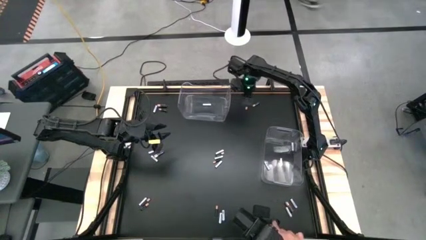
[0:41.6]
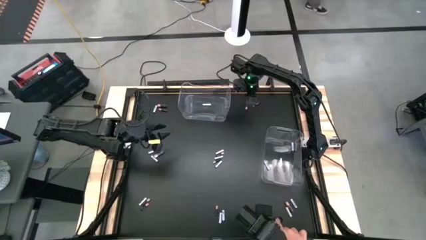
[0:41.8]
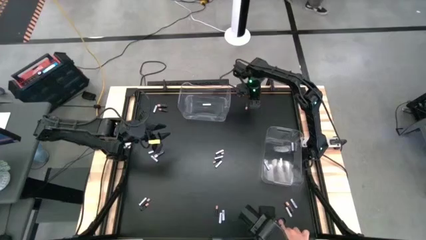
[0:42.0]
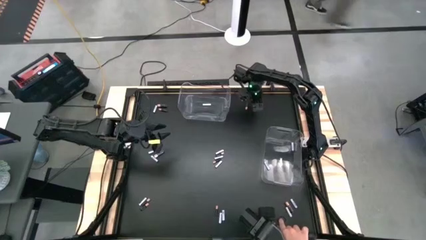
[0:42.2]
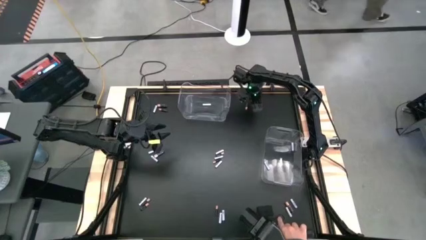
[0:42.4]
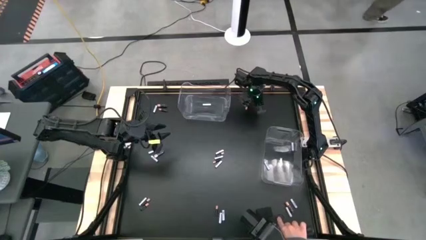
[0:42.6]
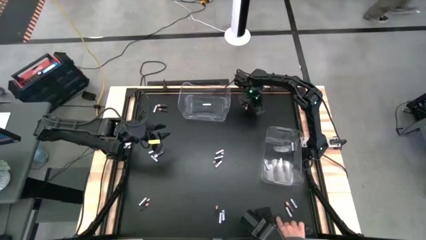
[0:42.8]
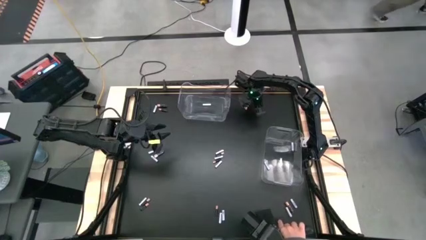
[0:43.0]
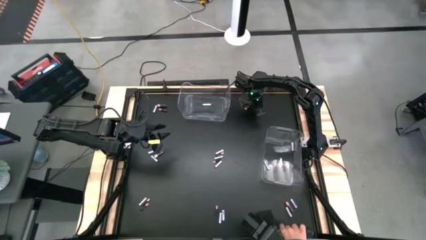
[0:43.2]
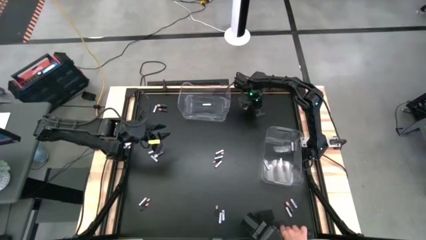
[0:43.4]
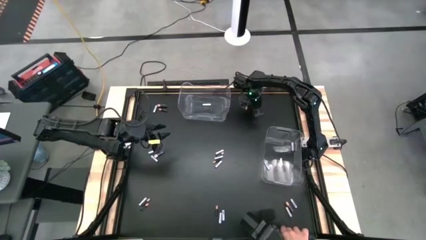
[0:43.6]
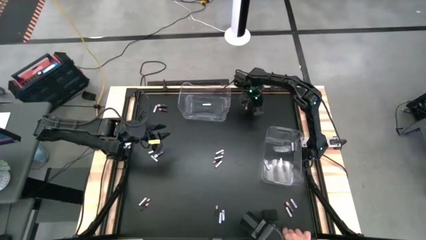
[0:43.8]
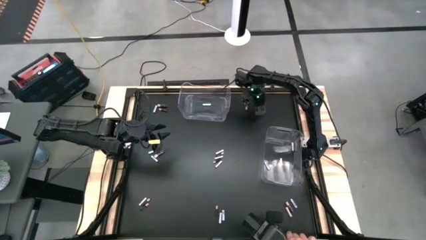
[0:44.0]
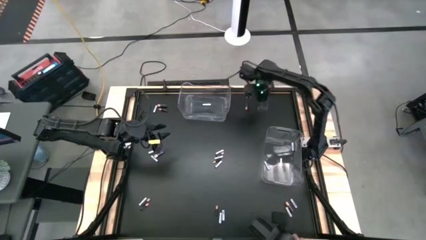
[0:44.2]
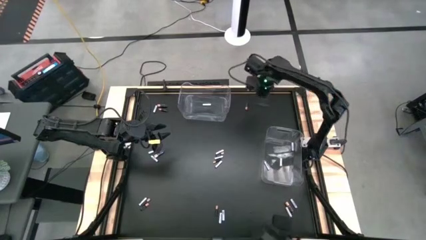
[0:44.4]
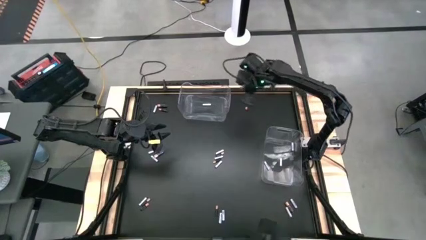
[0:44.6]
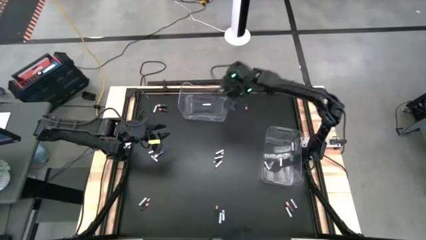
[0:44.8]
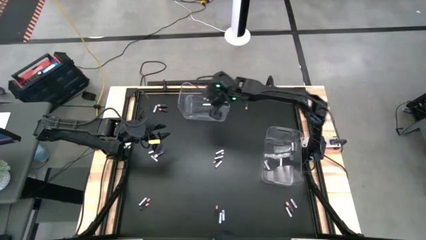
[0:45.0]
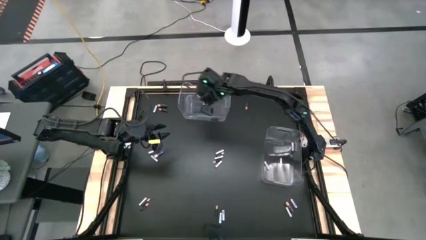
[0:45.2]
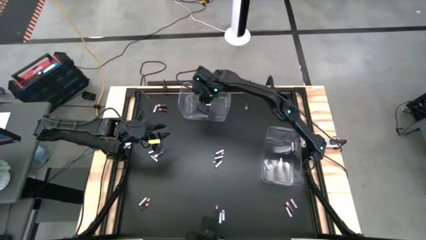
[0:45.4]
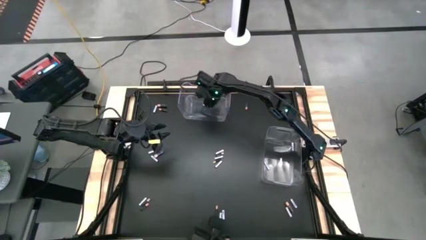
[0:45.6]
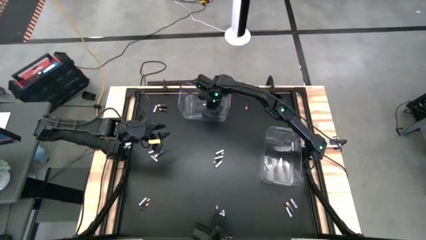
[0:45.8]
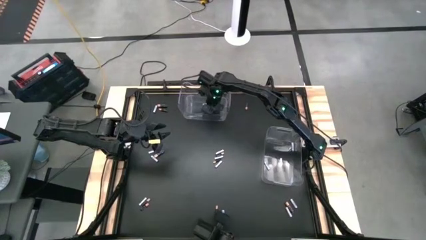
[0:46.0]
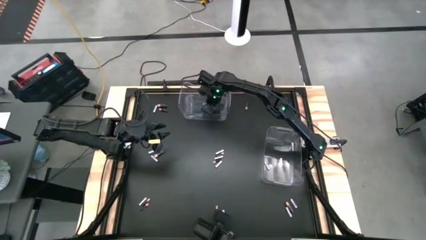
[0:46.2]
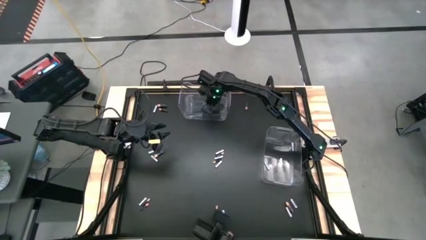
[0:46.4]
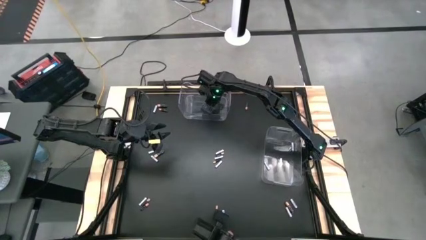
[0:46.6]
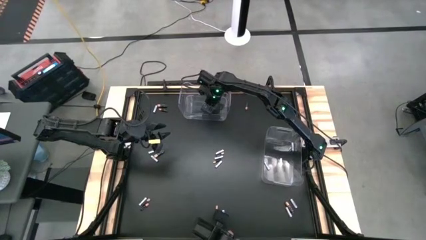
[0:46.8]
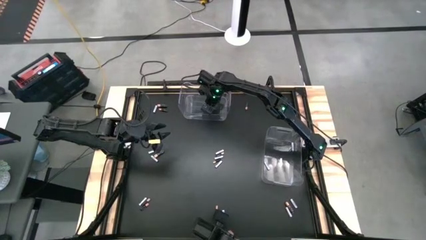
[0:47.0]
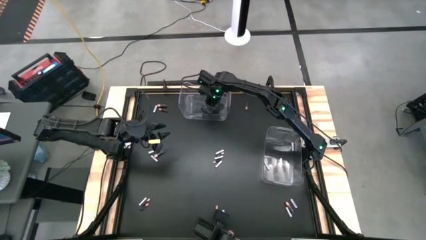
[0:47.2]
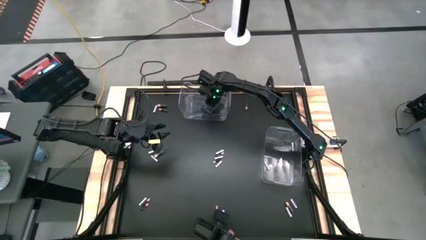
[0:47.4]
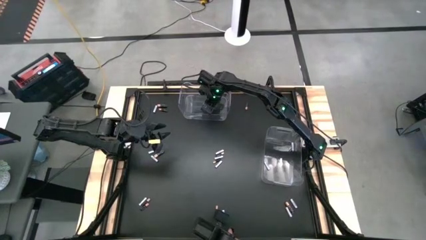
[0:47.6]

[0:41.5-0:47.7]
Task: Sort batteries
Put the black battery into the top transparent bin

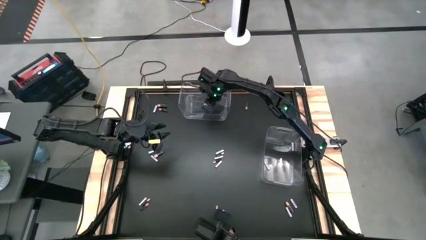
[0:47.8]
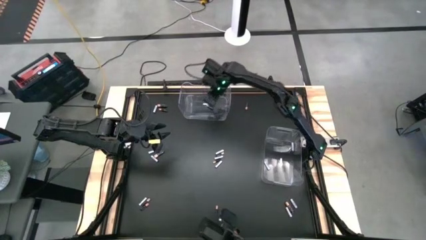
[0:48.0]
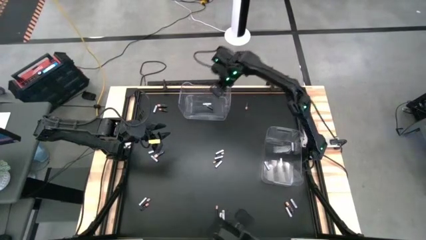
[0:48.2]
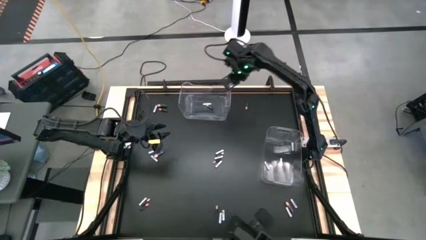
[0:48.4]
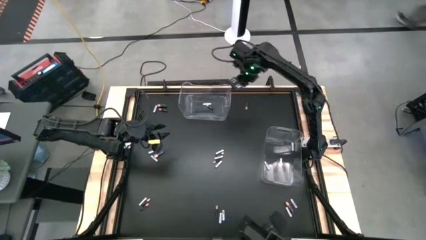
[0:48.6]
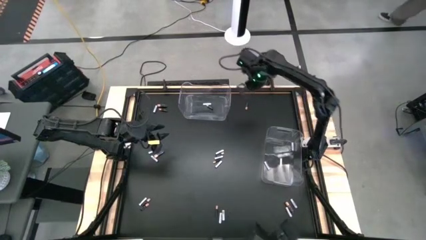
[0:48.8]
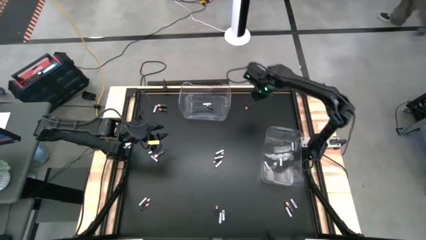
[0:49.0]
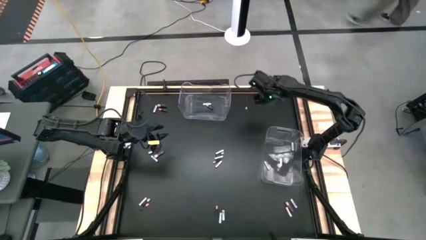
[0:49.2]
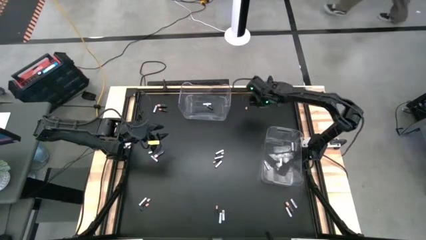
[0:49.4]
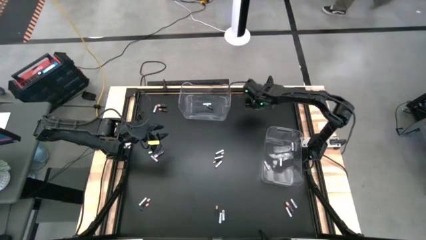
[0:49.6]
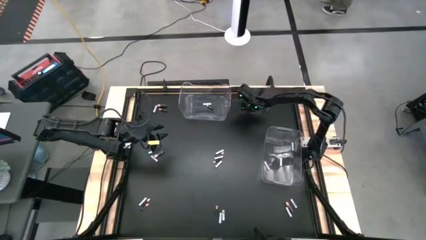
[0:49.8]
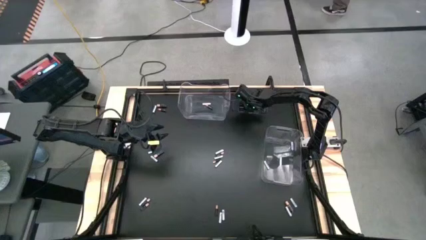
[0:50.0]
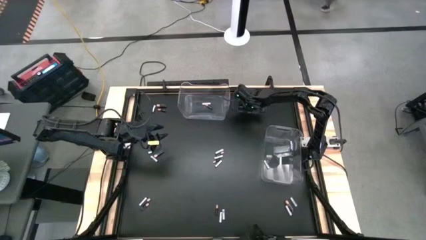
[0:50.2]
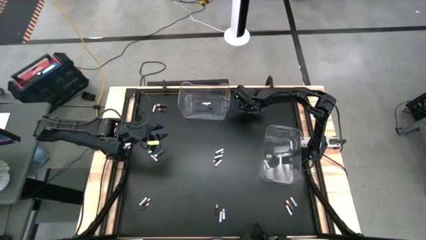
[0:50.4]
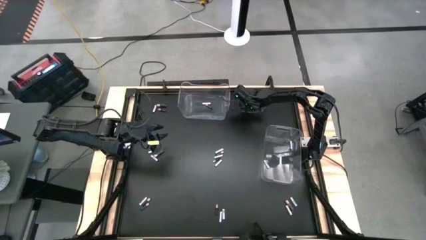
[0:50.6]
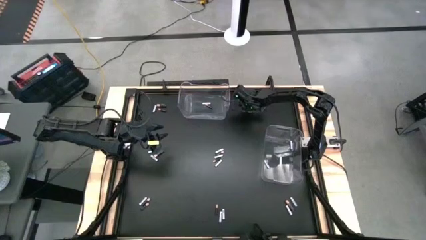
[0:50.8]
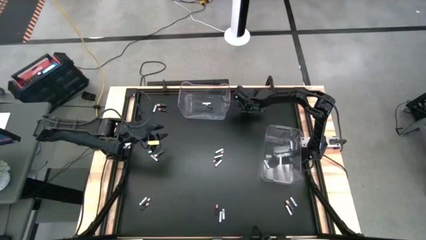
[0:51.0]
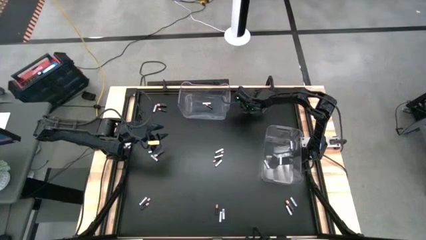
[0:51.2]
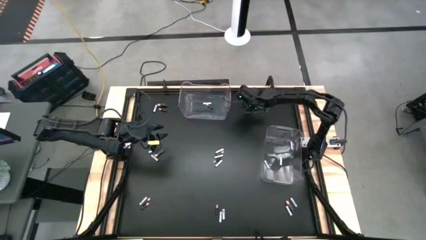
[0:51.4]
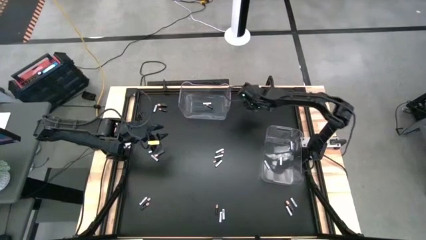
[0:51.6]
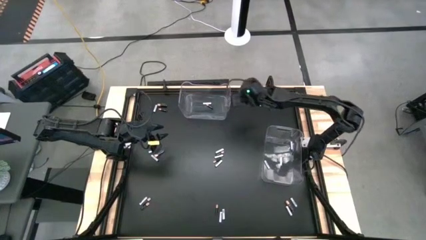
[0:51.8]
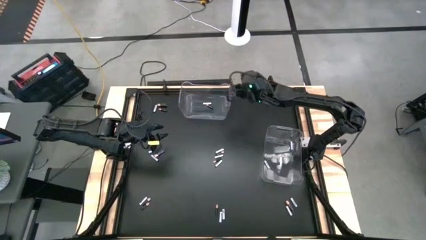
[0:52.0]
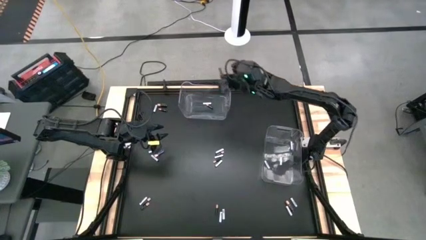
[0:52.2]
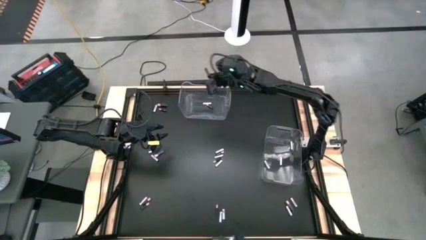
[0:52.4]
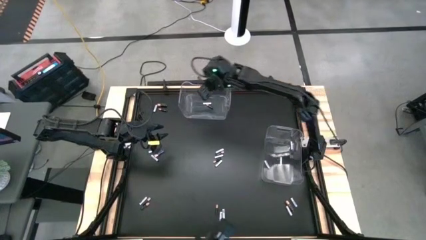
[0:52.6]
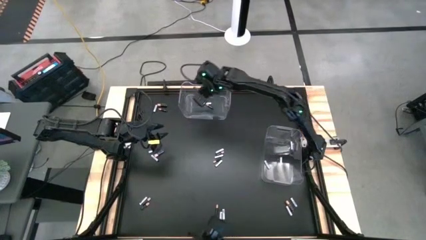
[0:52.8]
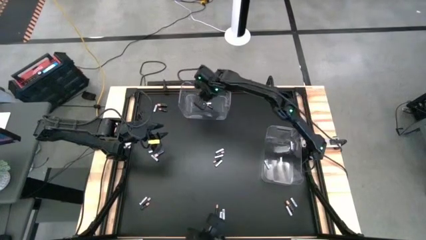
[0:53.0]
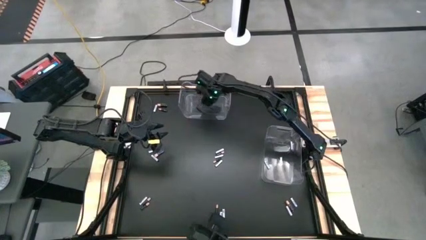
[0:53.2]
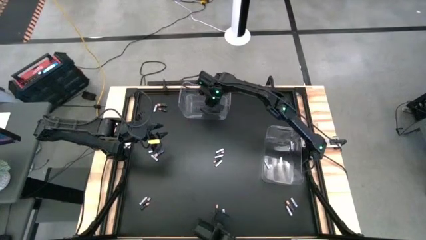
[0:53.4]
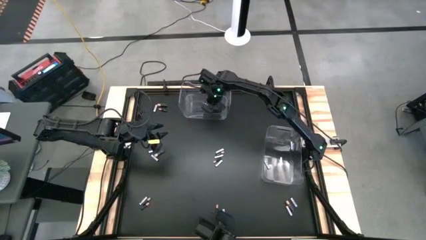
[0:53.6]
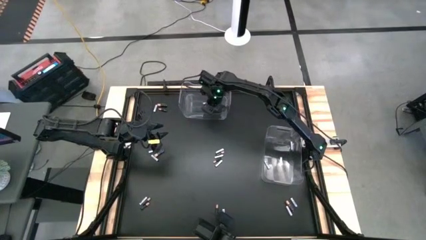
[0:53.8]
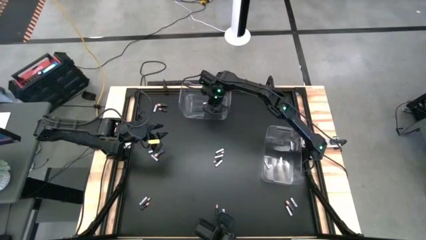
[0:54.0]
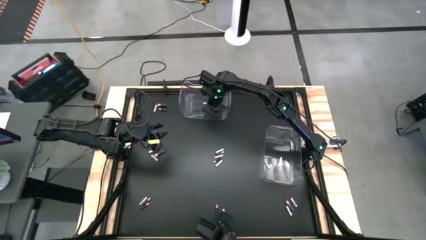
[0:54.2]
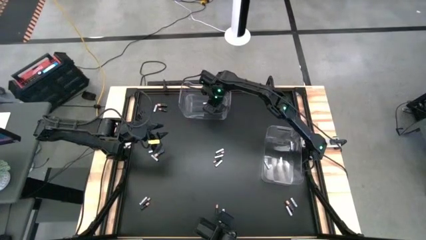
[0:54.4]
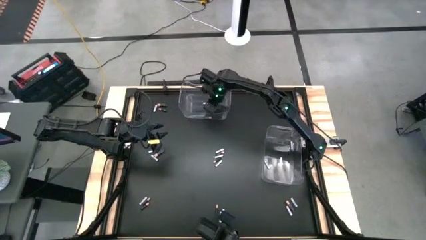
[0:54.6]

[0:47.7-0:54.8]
Put the black battery into the top transparent bin

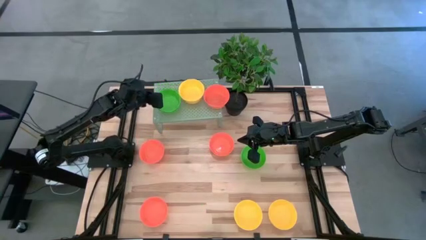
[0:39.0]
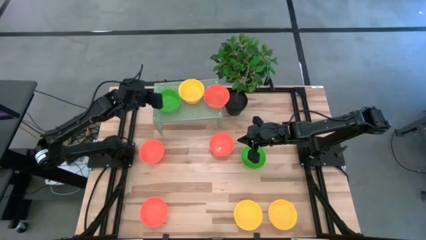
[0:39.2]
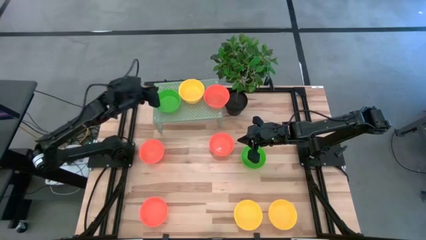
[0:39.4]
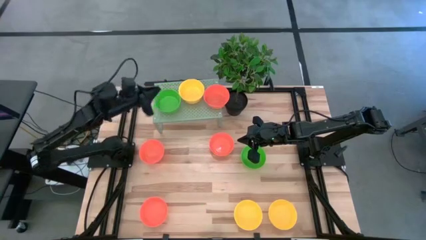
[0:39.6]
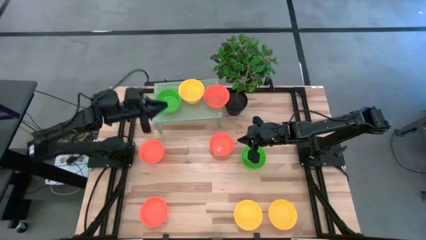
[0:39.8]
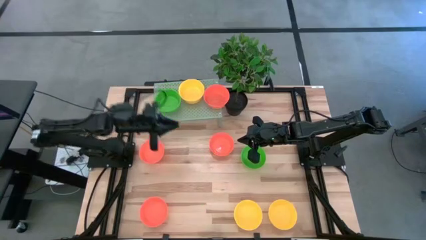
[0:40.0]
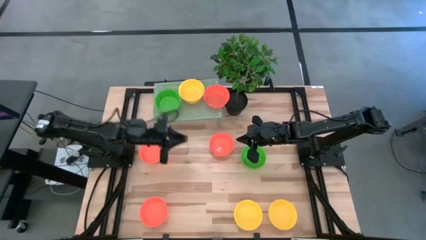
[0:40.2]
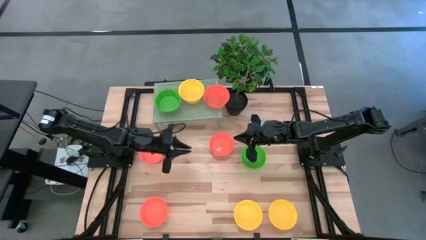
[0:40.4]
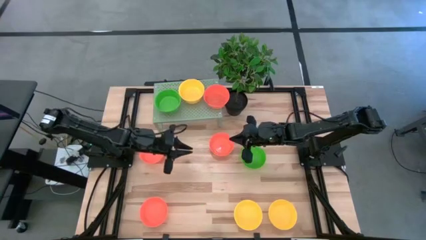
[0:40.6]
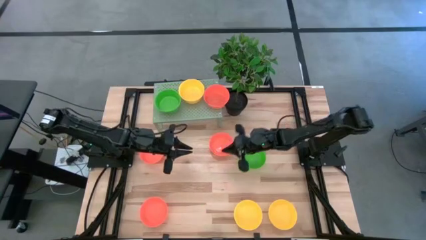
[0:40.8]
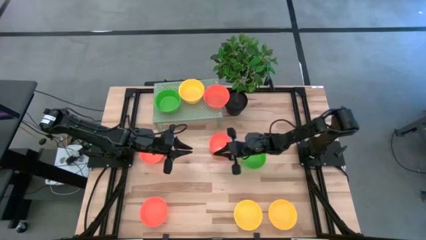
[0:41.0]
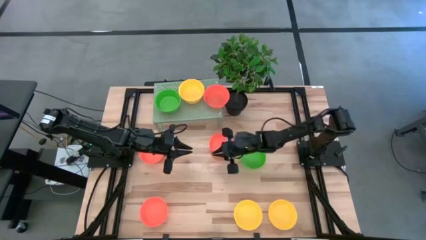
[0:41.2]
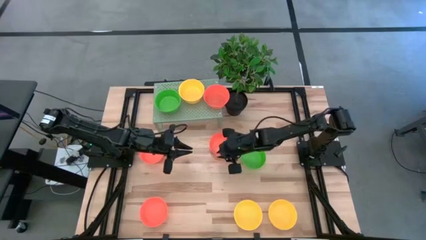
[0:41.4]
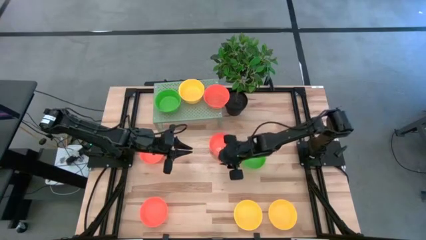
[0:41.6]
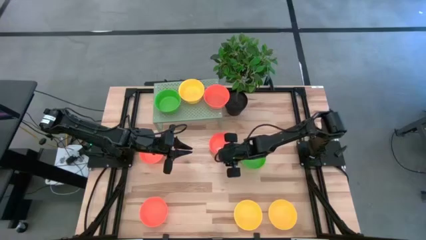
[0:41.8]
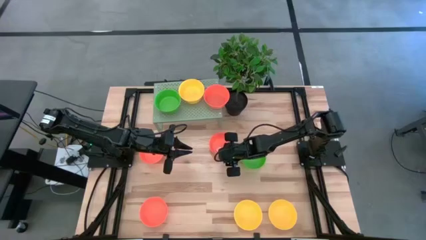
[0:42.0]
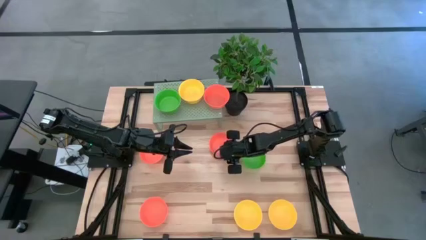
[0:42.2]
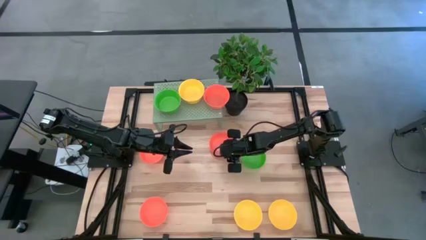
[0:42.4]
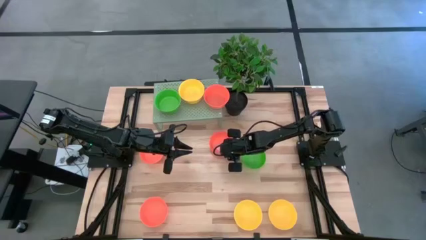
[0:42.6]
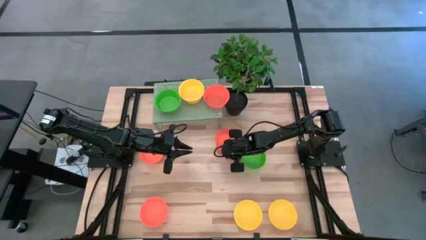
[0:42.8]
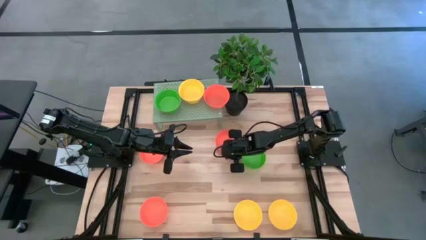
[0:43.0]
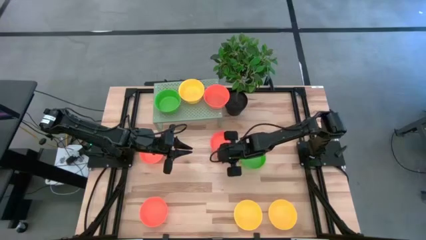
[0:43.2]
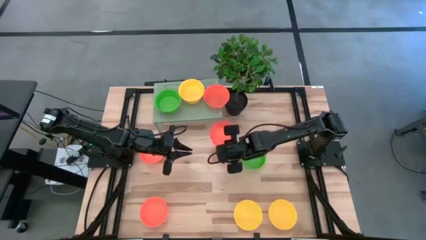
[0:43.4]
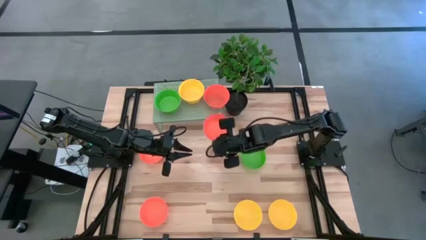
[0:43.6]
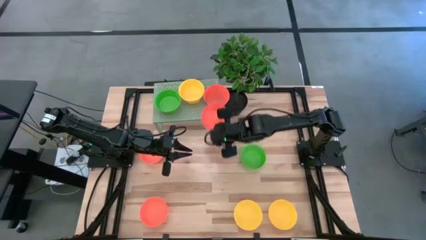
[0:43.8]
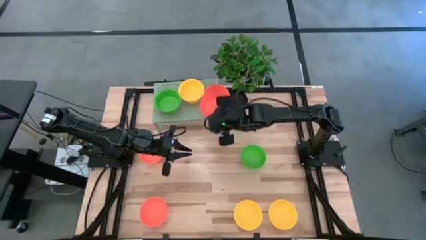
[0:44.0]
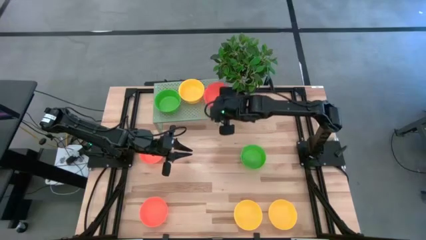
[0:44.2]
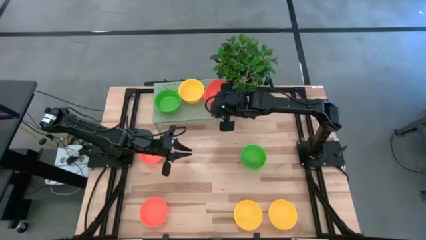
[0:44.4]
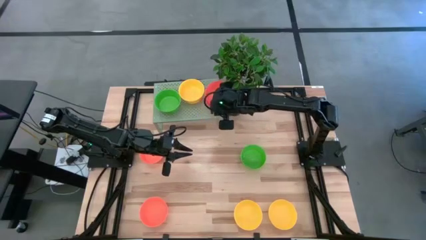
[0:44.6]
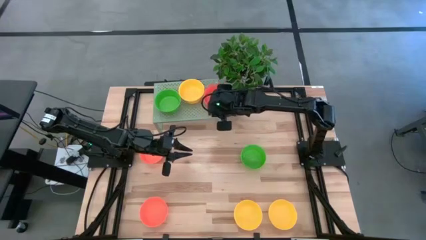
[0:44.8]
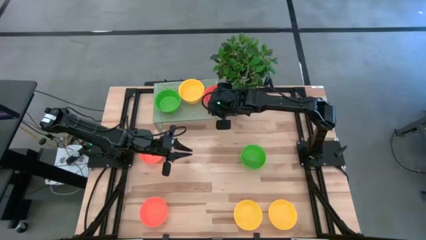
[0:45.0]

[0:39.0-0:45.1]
Task: Pick & Place Mini bowls
Stack the orange bowl on top of the orange bowl on the shelf
